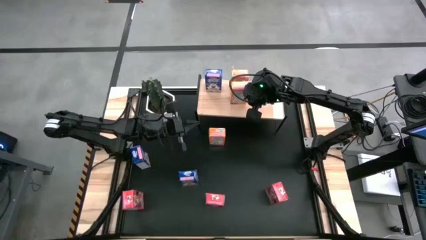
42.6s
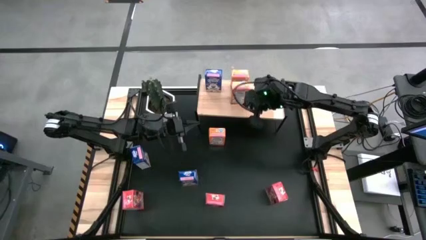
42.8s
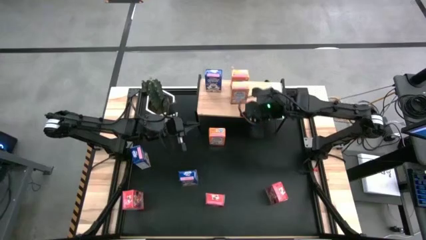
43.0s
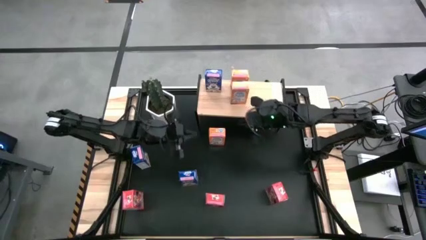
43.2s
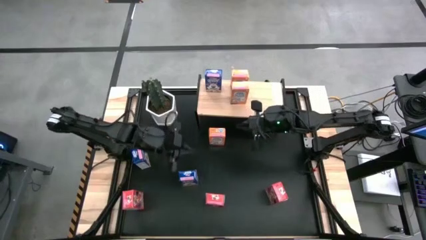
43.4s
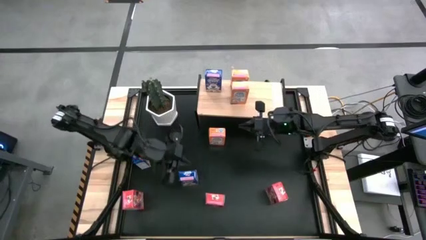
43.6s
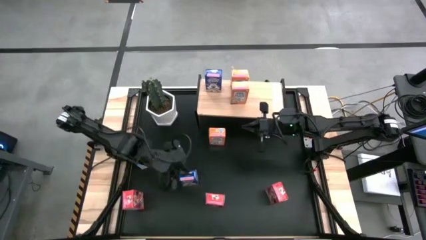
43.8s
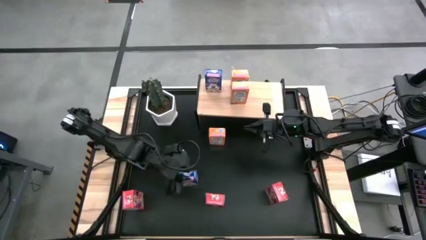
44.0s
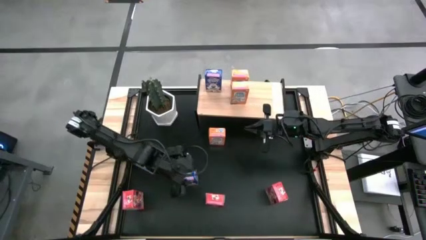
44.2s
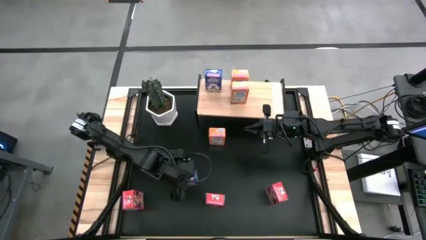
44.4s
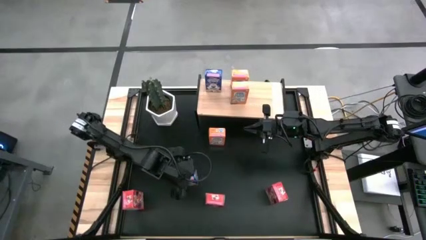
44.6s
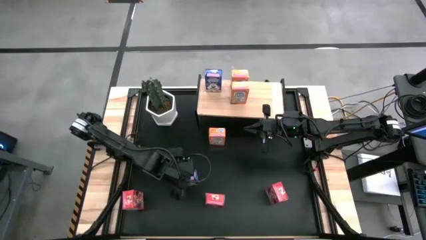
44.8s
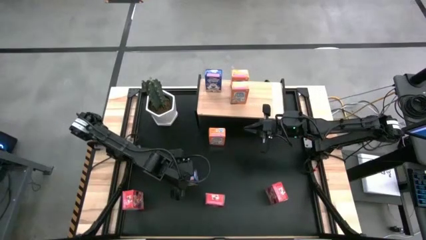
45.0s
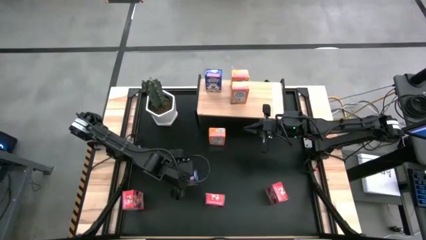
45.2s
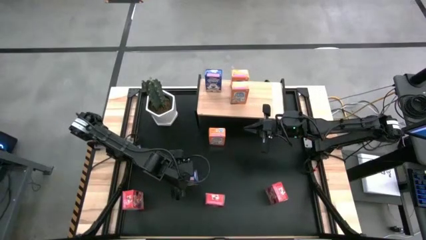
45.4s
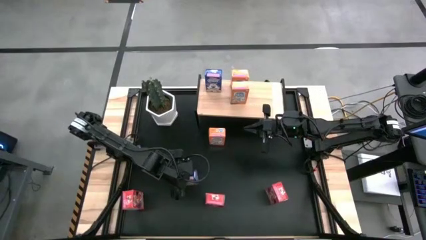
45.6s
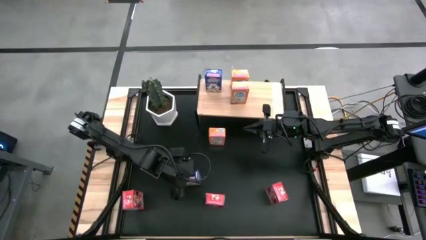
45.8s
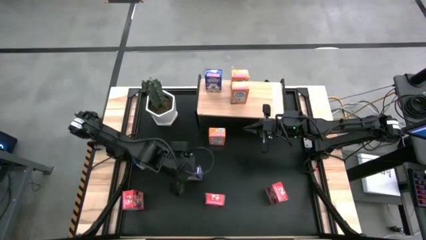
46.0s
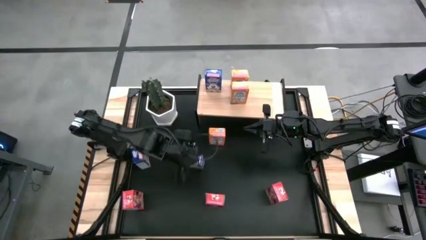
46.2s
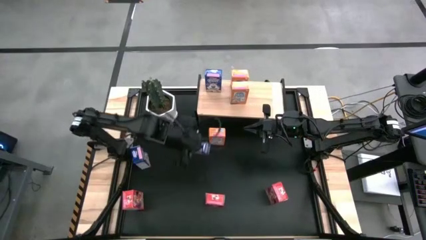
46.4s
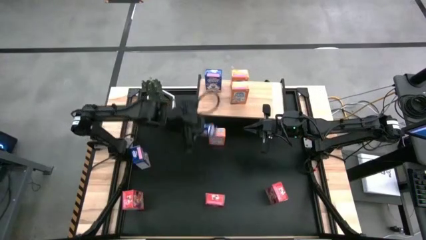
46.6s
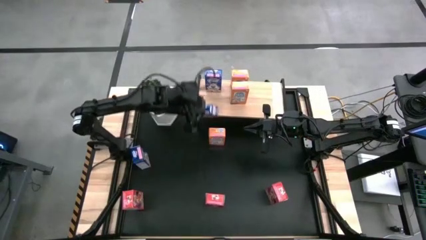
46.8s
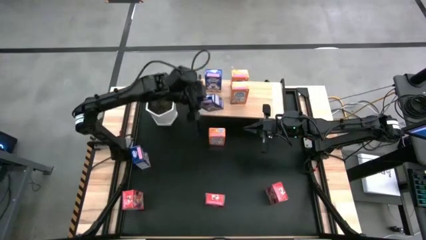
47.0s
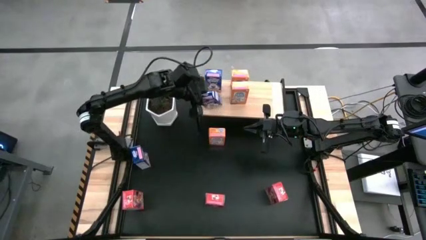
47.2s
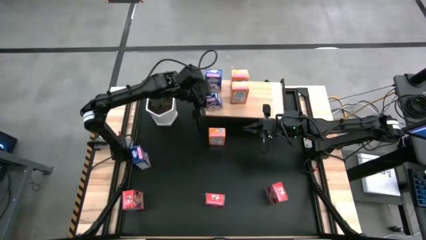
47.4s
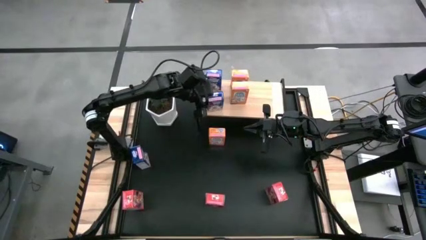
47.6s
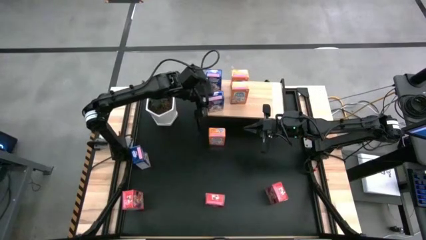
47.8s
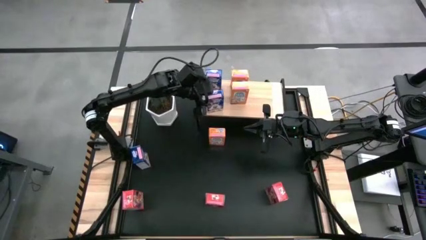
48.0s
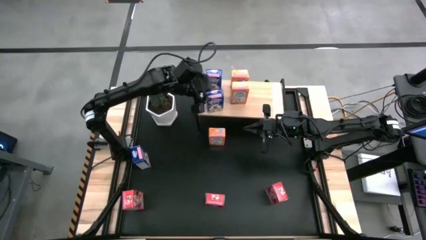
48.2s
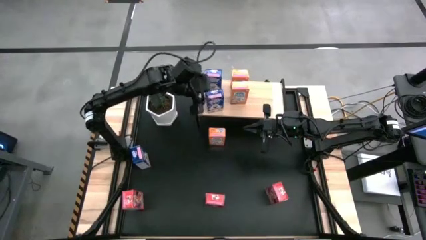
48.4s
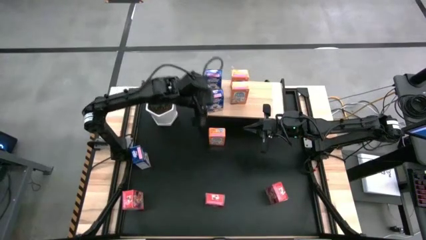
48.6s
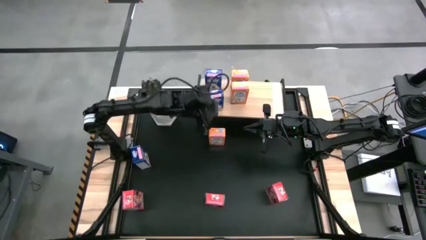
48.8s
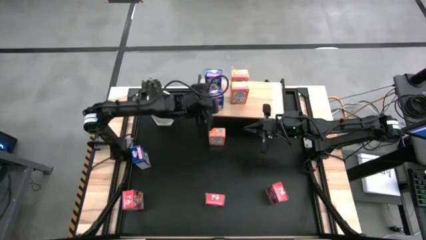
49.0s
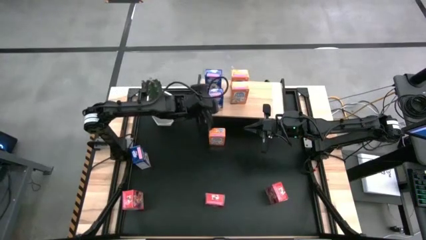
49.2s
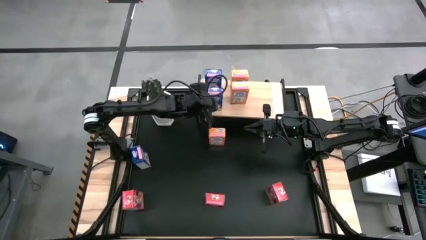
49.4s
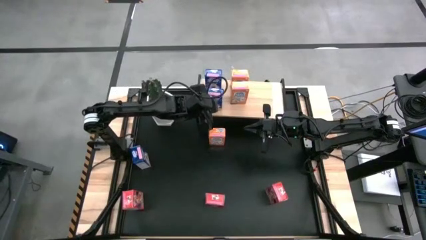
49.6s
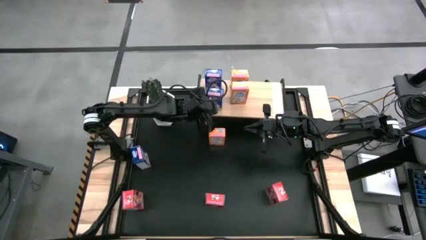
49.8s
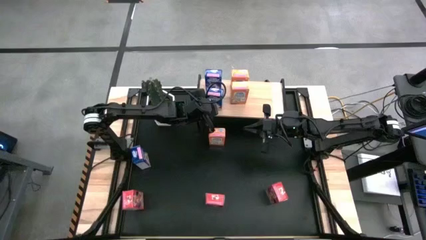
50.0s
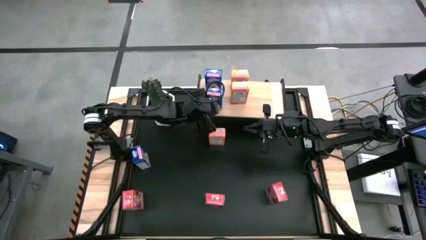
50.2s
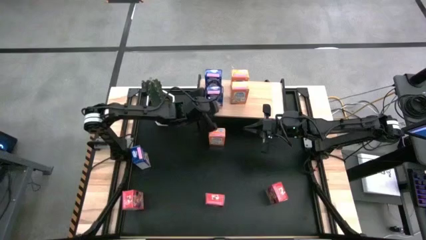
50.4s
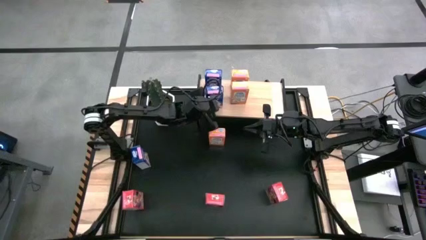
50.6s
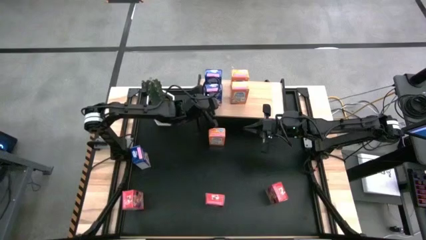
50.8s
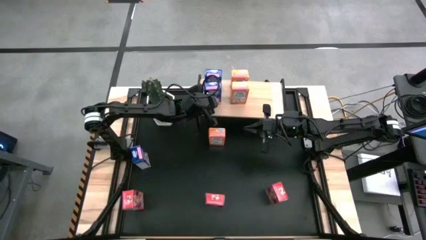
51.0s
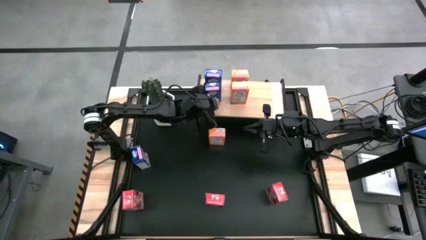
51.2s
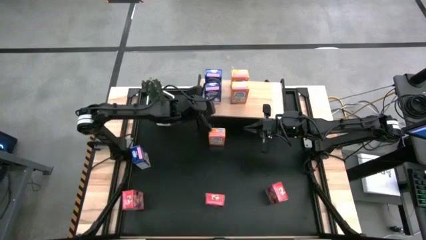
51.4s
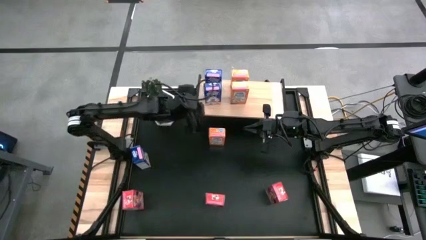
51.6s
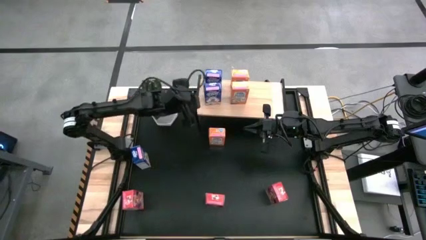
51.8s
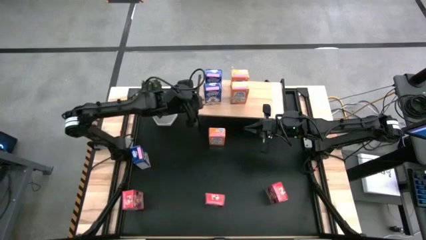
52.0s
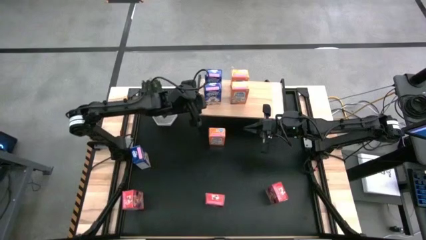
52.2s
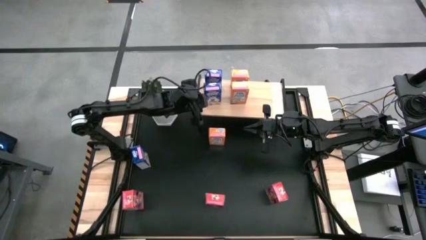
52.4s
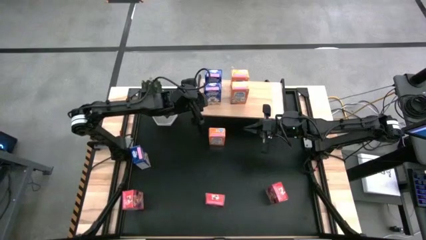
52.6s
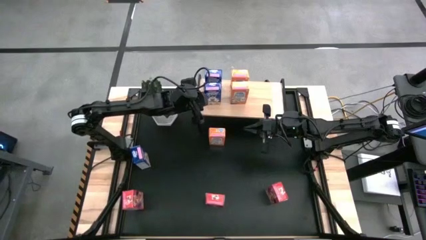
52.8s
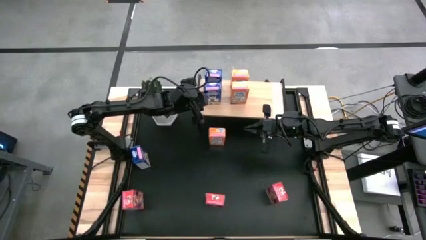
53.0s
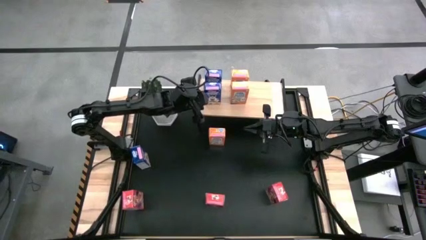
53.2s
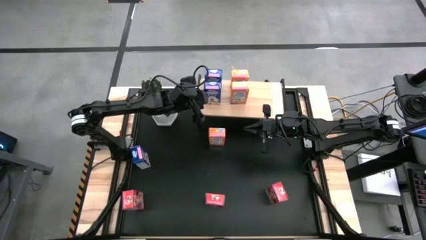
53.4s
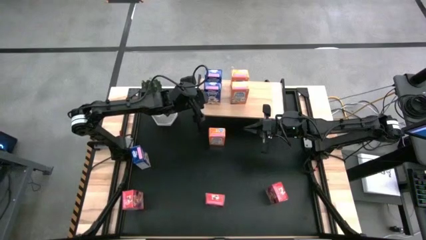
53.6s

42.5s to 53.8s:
Task: Stack cereal on shelf
Put the right blue cereal box on the shelf

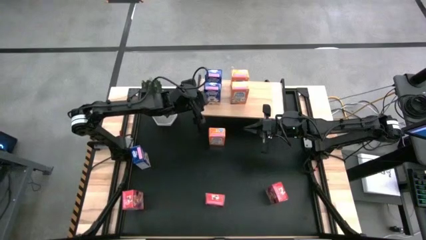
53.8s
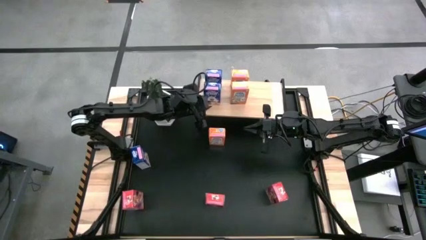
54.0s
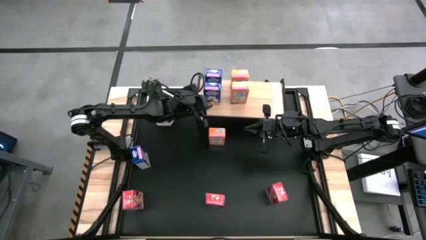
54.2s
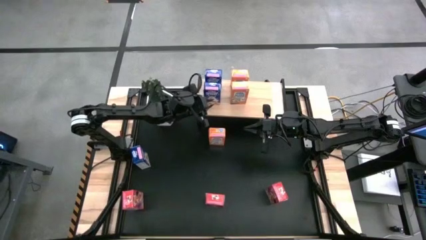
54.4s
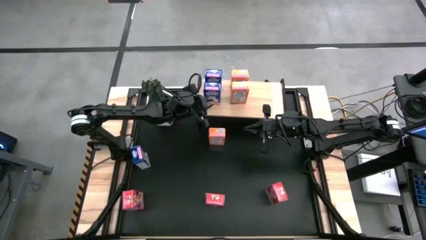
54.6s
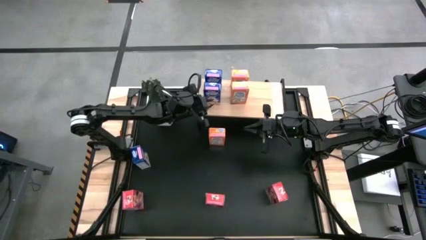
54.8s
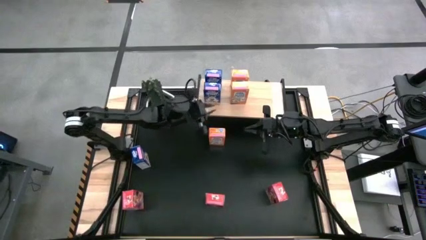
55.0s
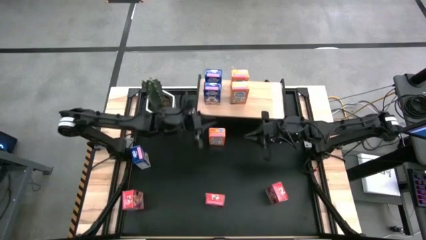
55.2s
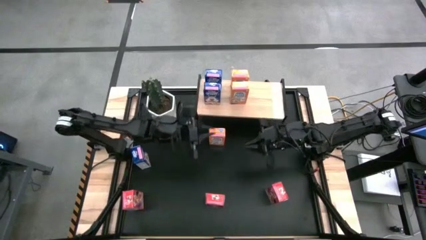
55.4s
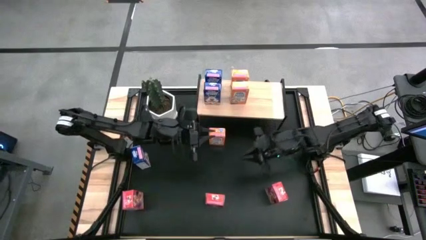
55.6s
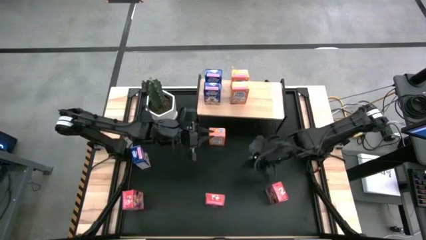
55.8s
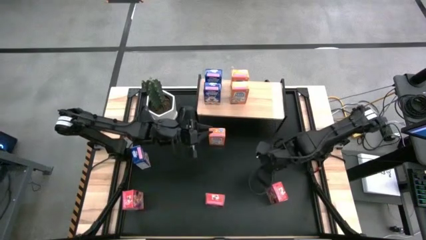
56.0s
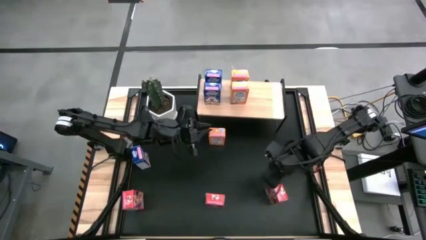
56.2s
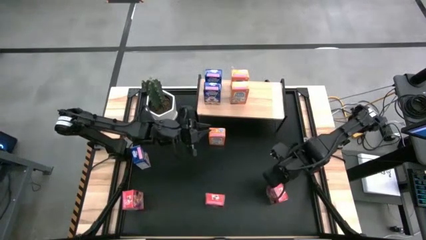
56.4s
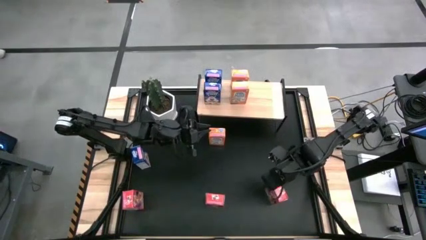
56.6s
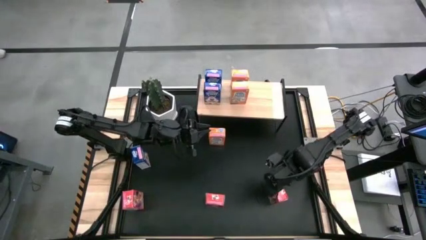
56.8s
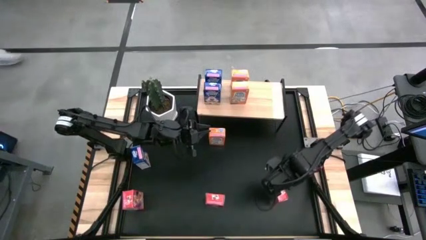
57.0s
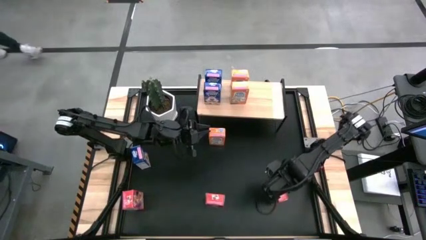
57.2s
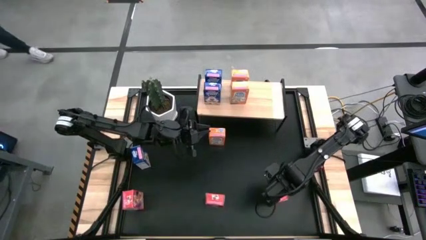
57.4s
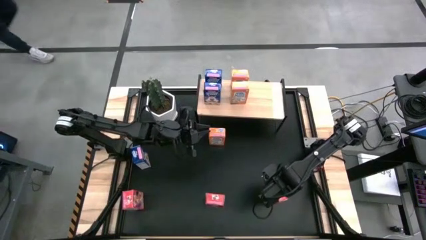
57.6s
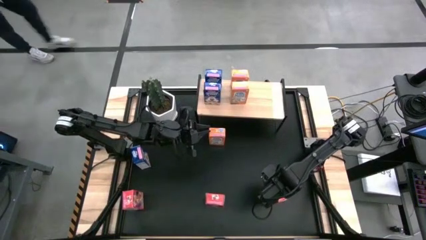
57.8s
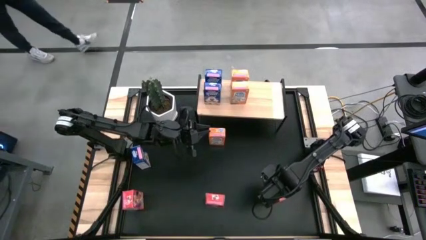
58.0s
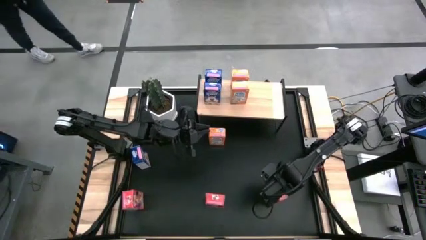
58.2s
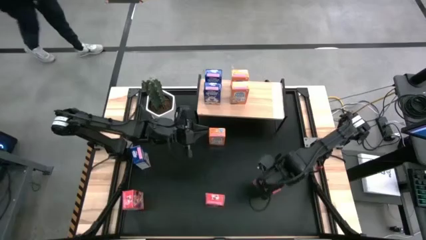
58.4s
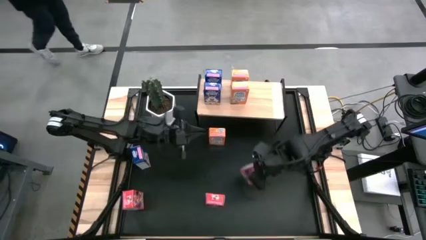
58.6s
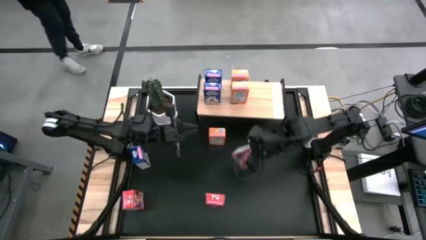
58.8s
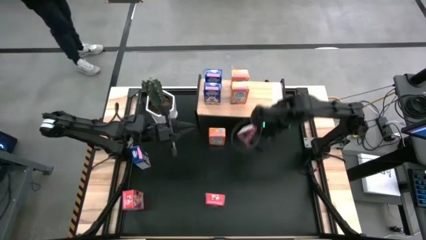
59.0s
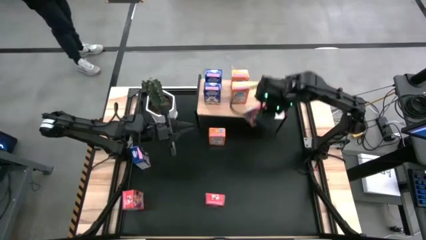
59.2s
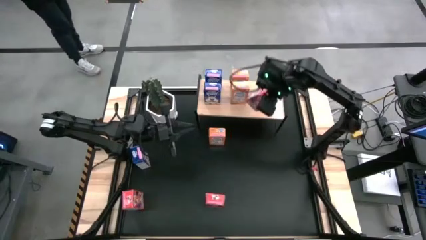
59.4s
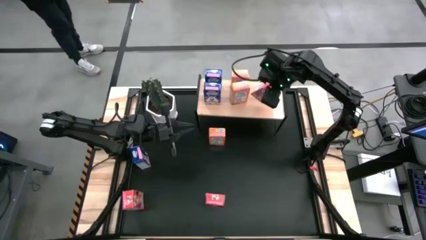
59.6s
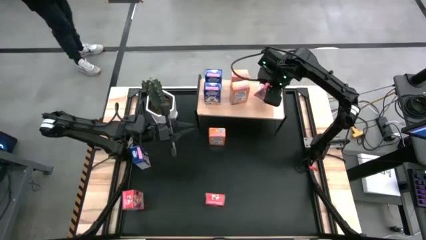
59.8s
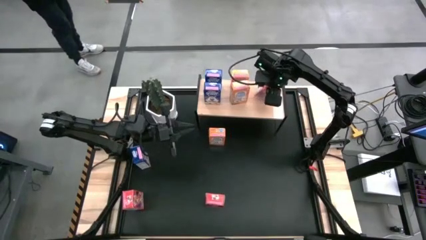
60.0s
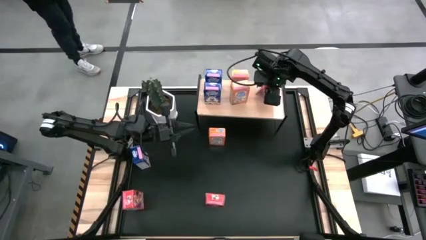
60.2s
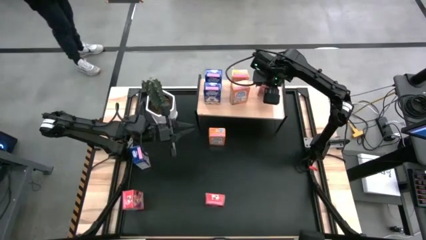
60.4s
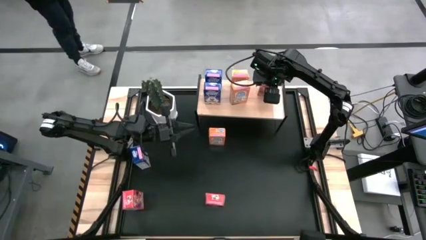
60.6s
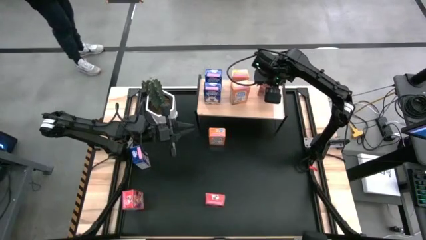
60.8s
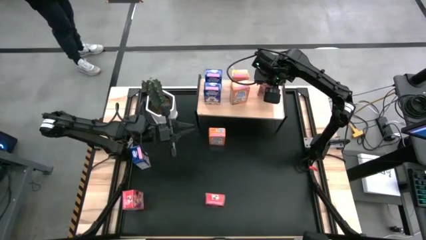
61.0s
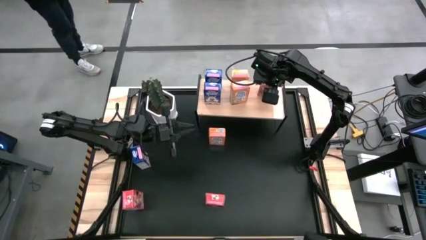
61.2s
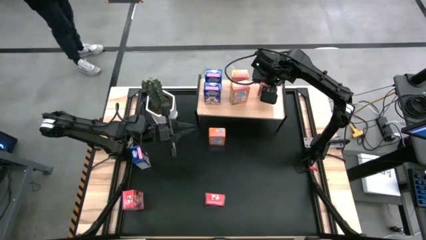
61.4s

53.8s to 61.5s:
Put the right red cereal box on the shelf
